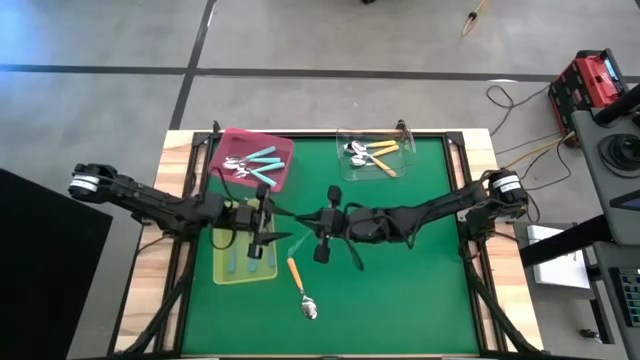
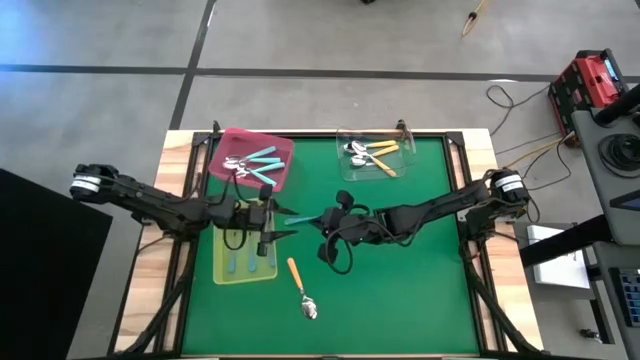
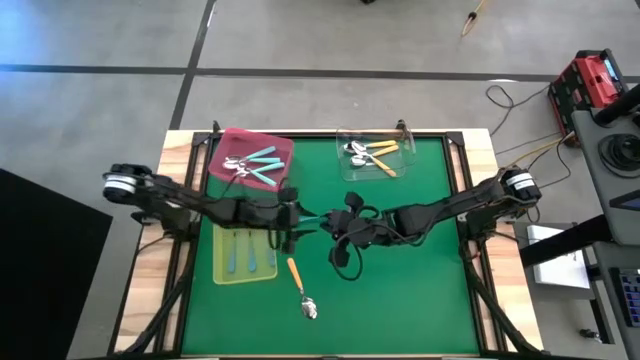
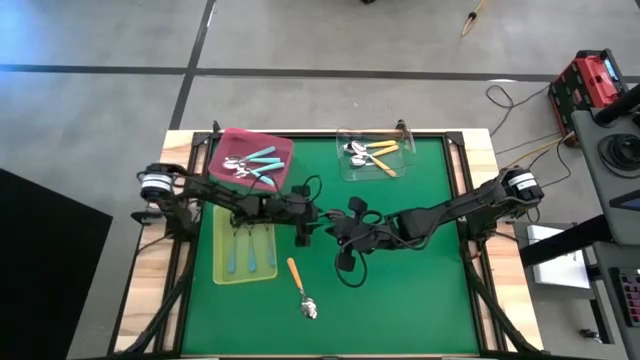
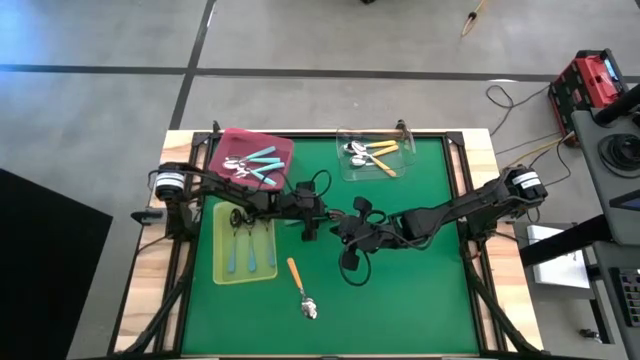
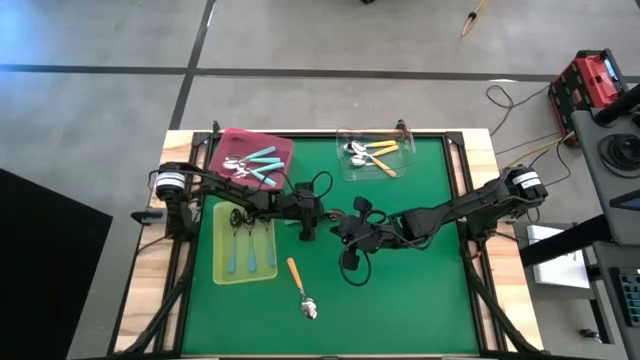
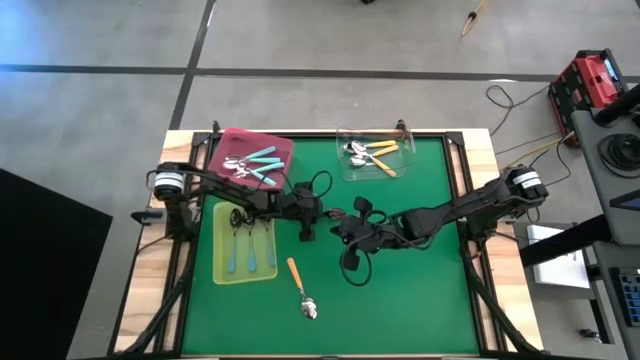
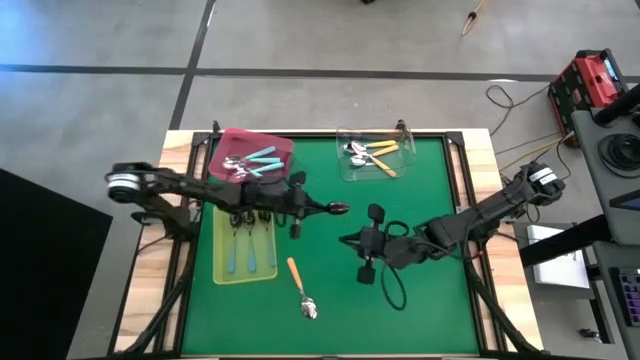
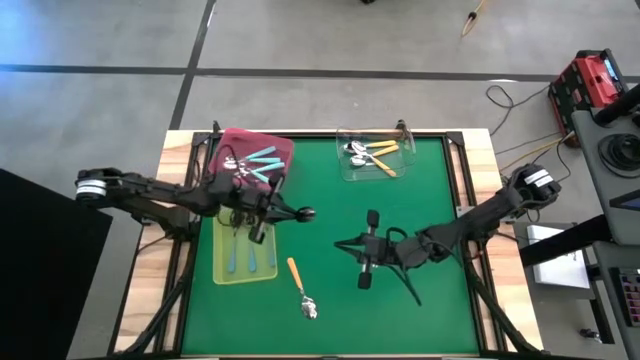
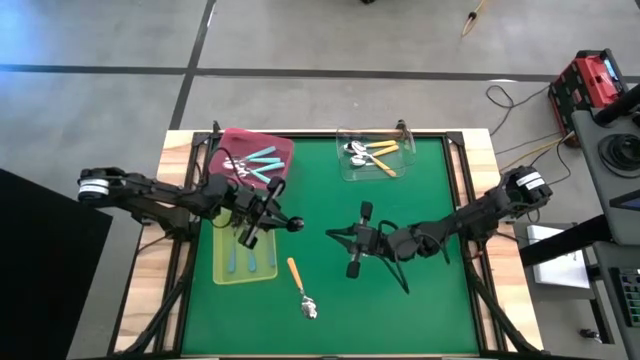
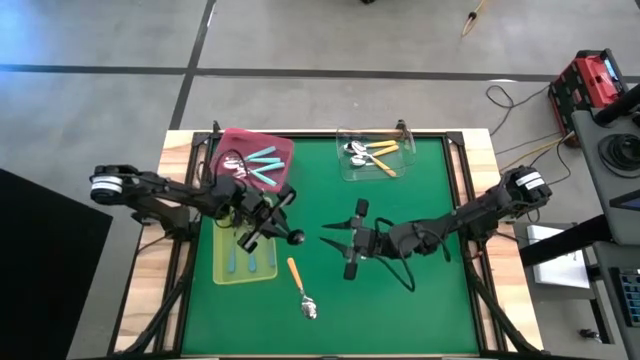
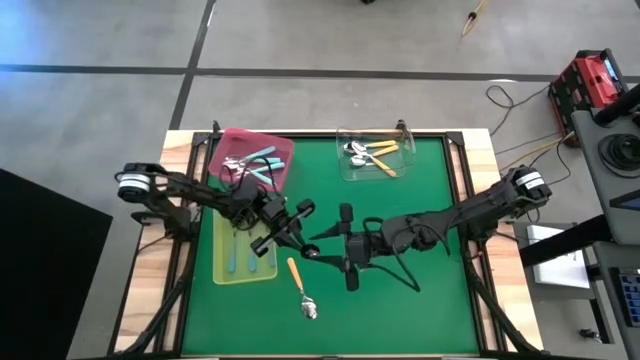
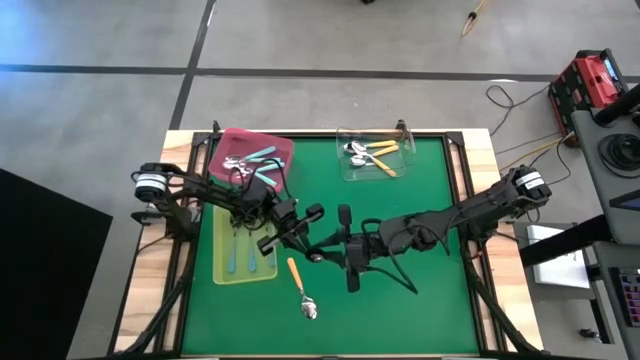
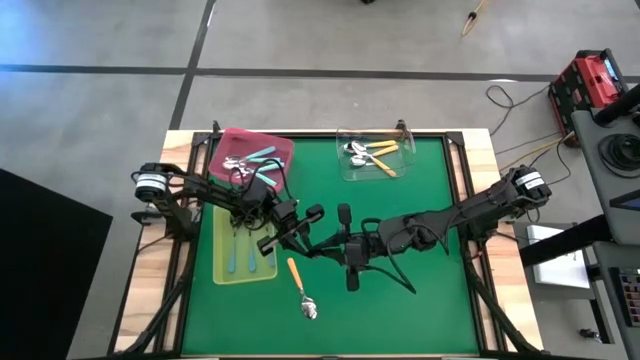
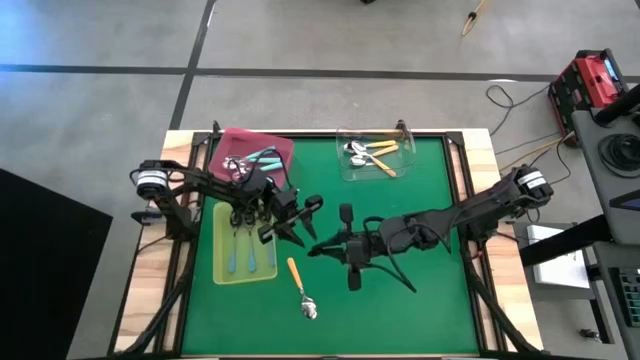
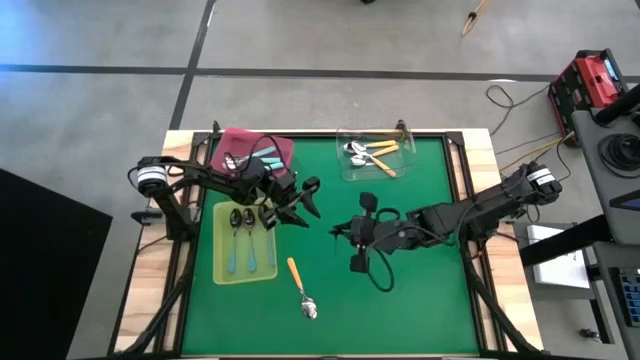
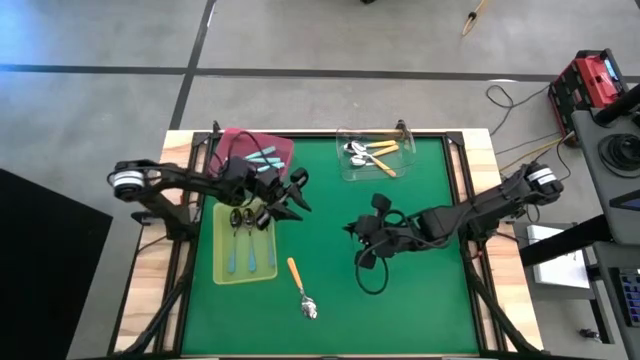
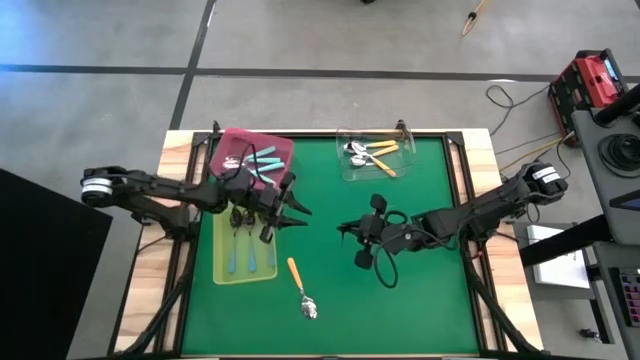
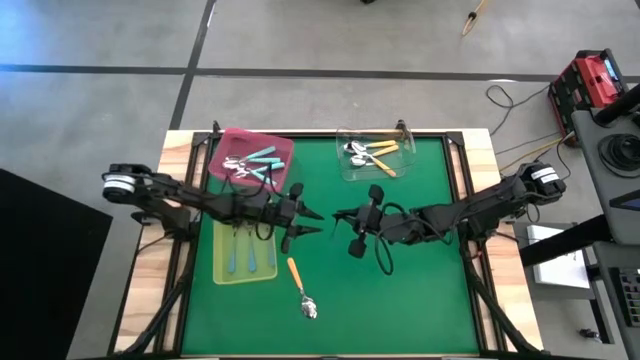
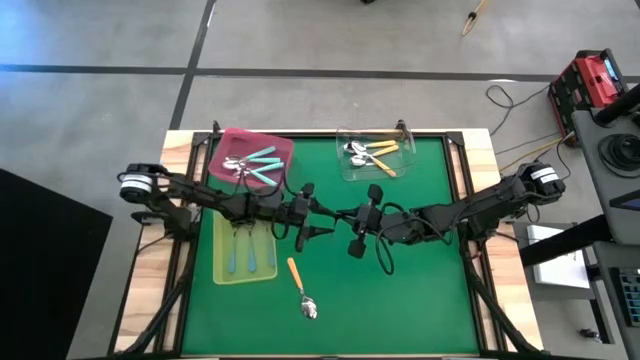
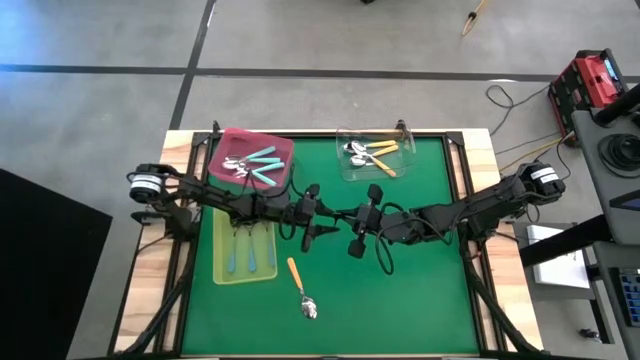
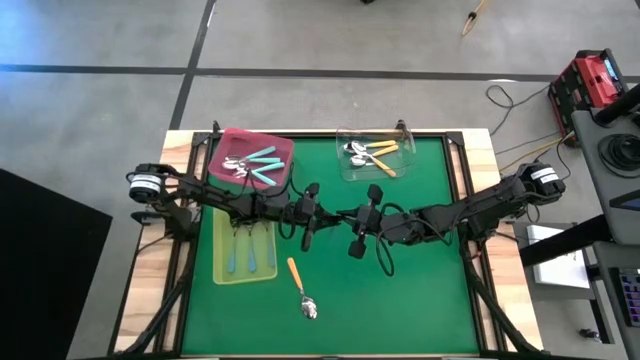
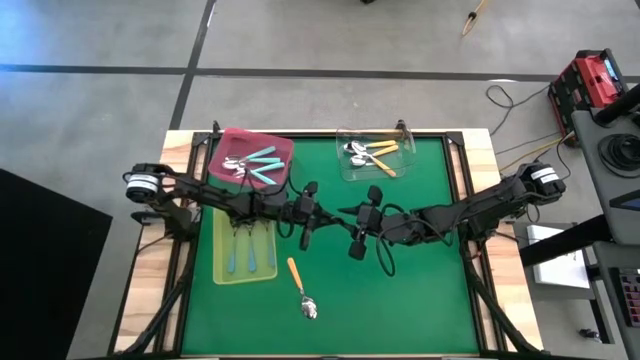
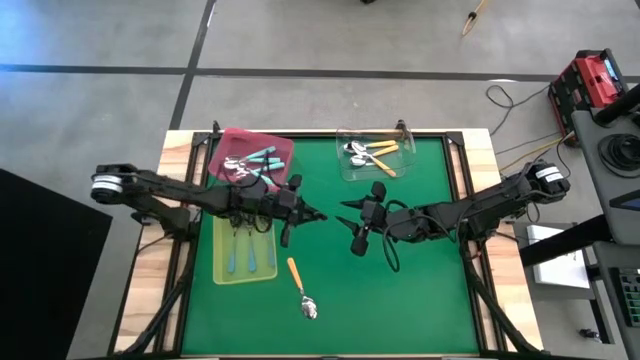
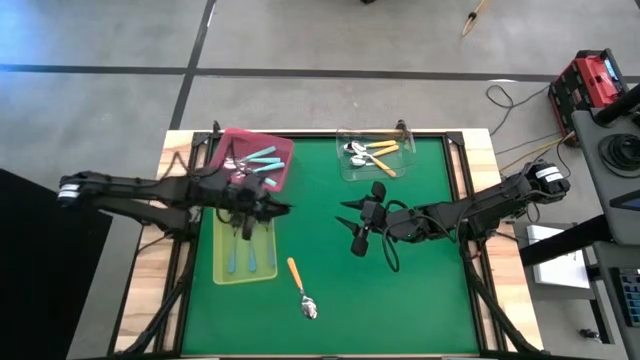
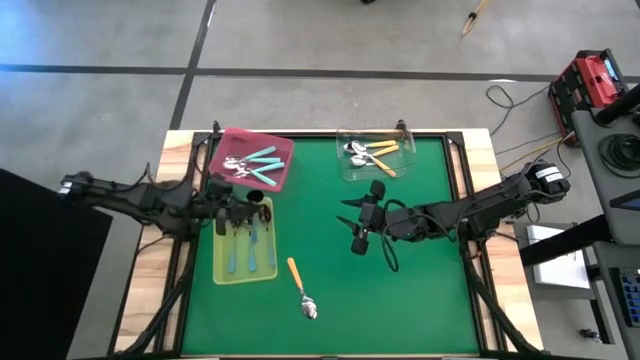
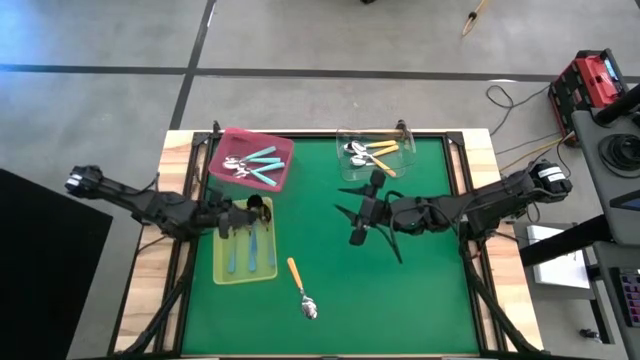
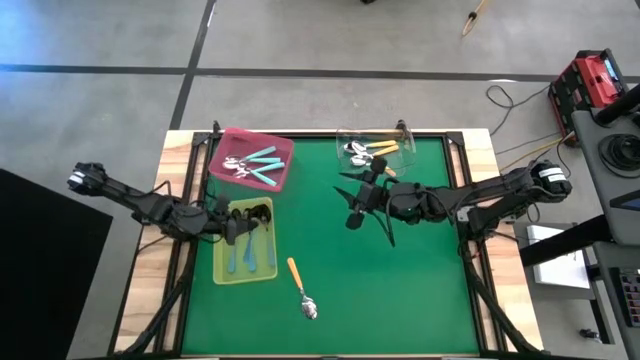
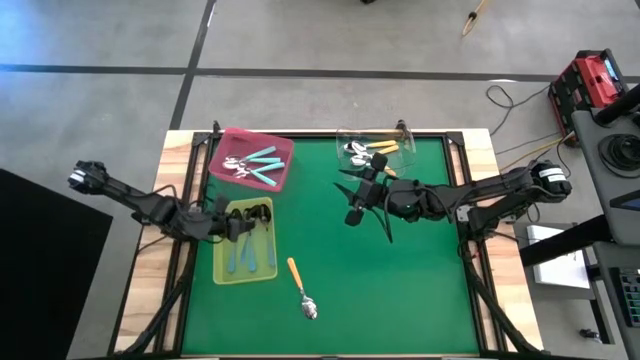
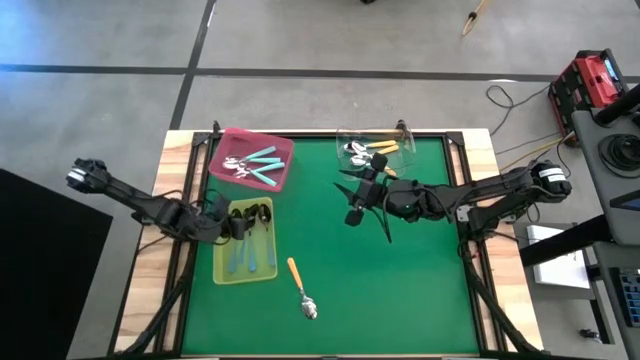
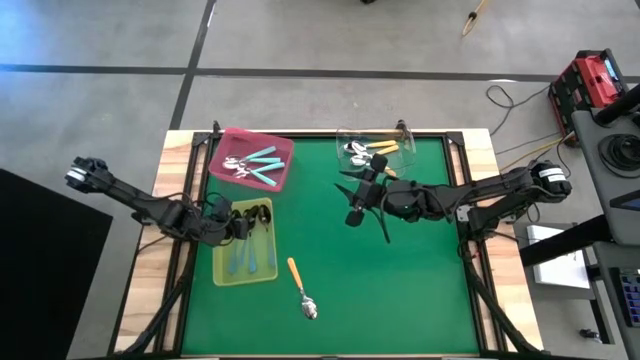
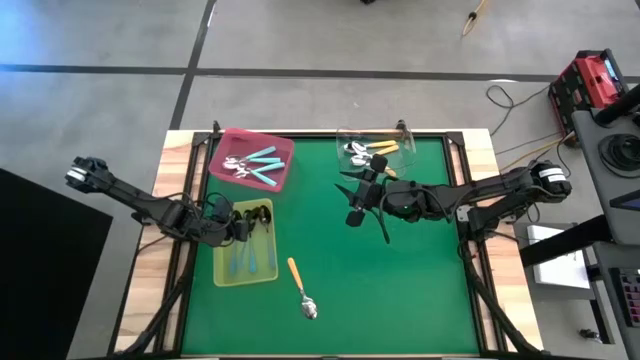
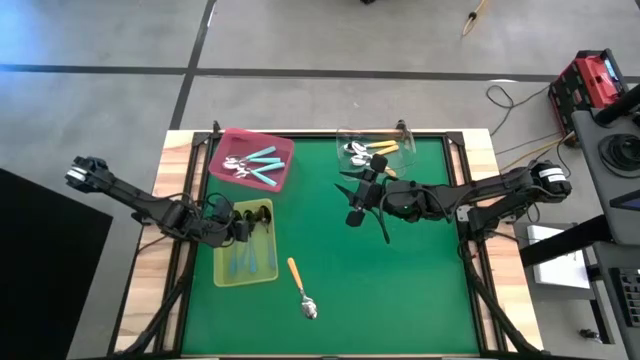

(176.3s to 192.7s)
Task: Sort silverware by color (type)
Put the blue spoon into the yellow bin

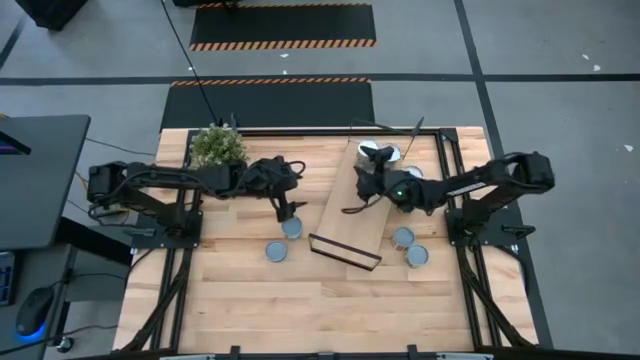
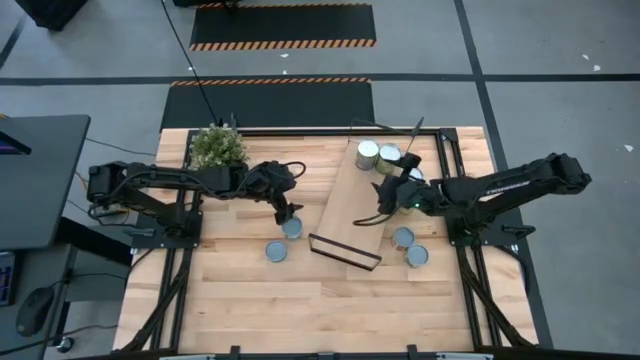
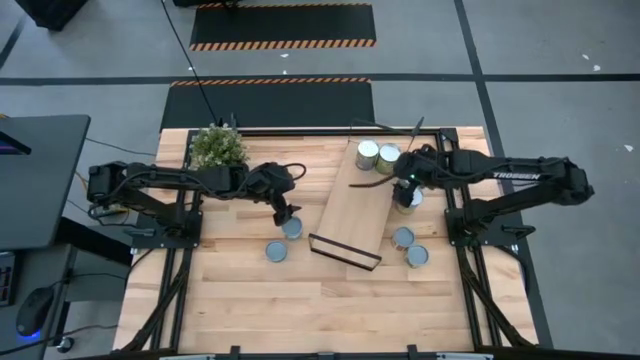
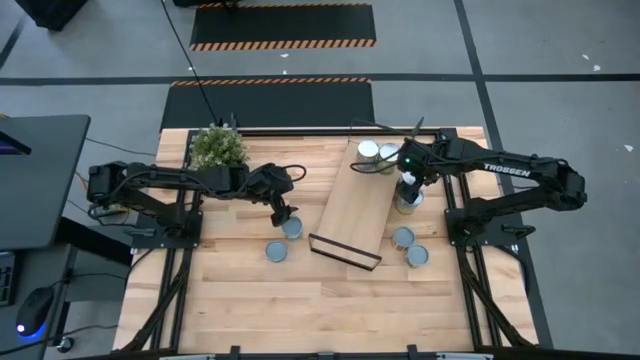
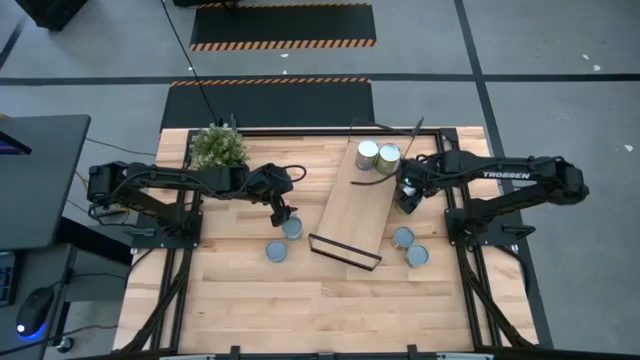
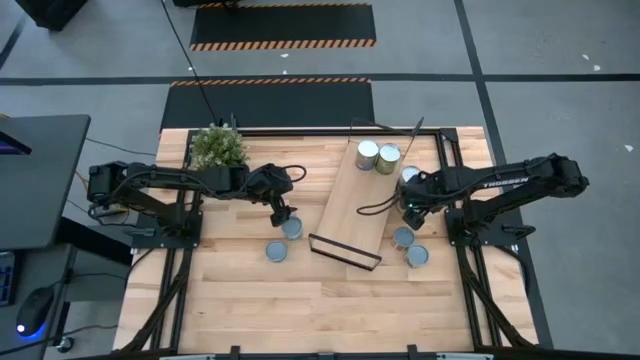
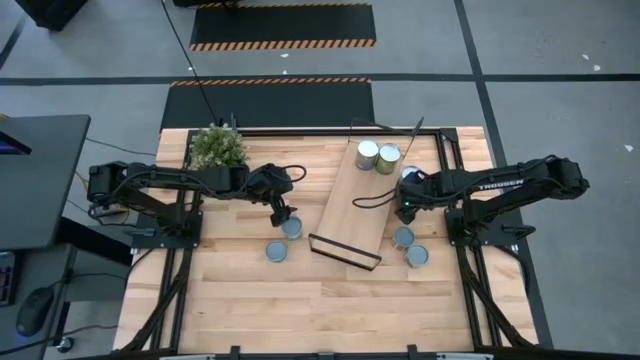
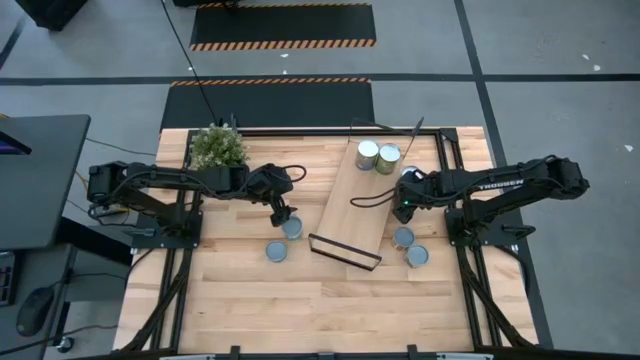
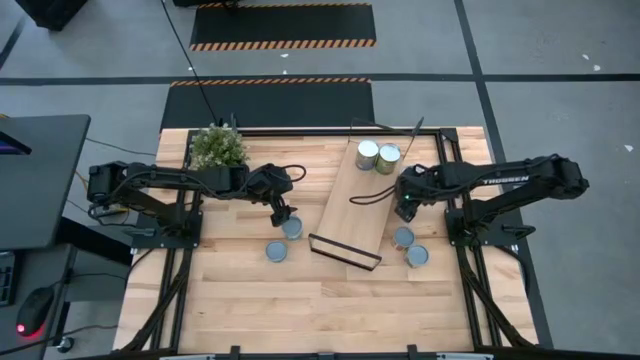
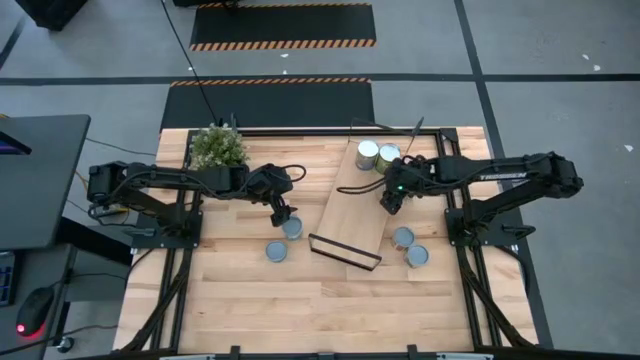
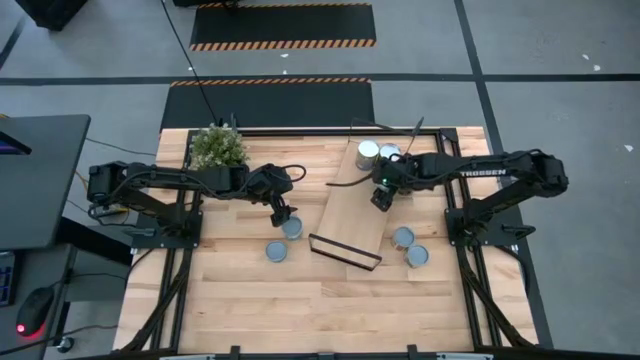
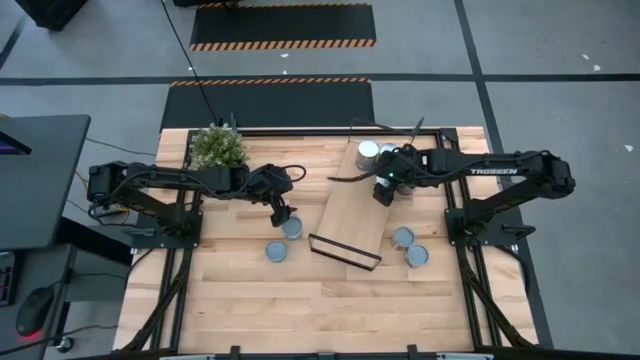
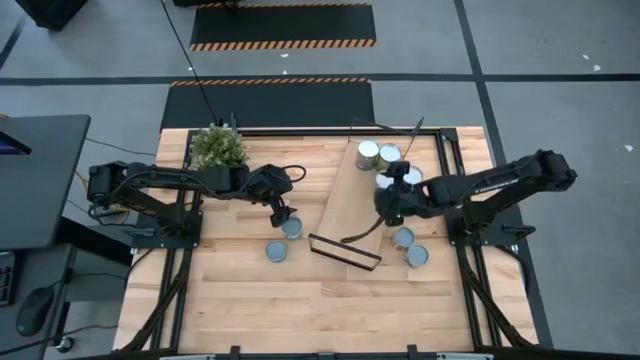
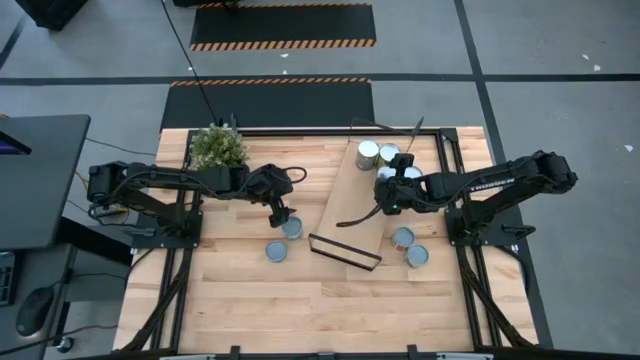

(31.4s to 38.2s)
Task: Pick and place cans onto a shelf
Put the canned carrots on the shelf
